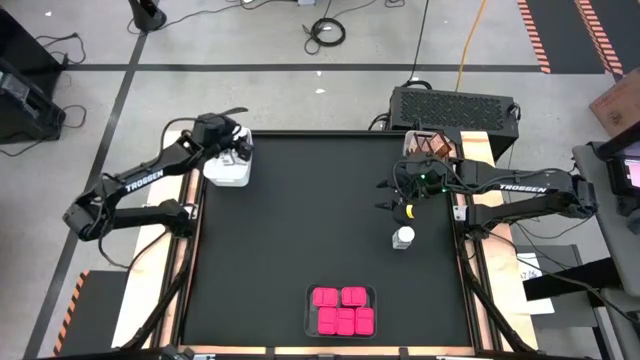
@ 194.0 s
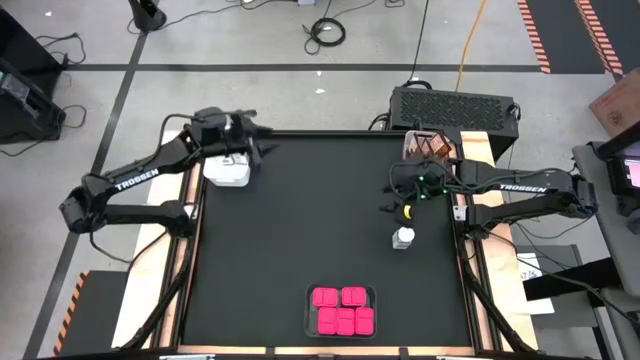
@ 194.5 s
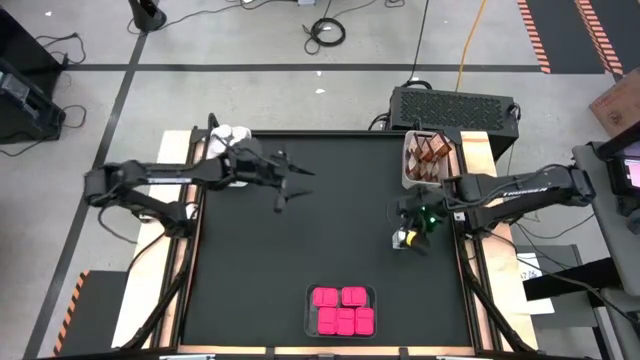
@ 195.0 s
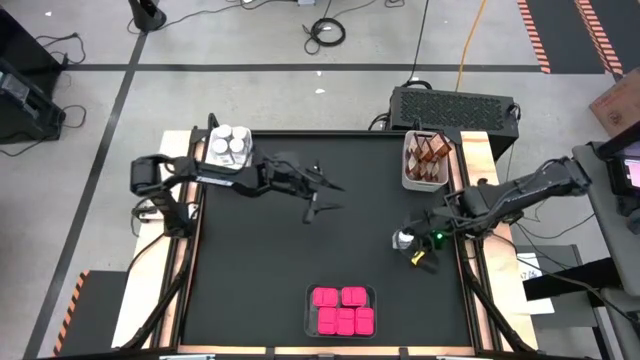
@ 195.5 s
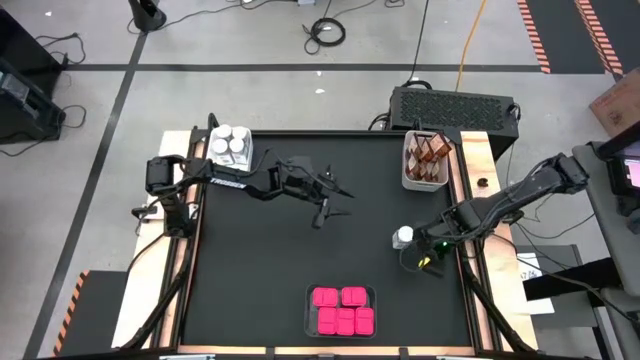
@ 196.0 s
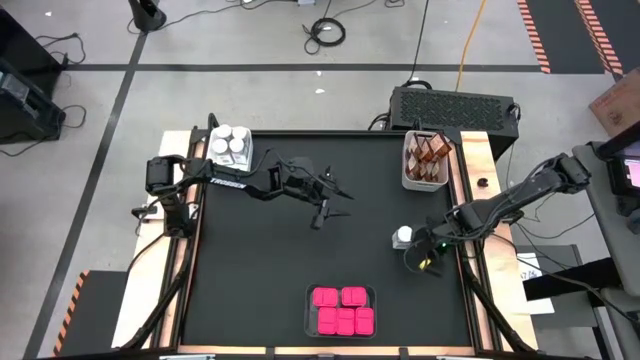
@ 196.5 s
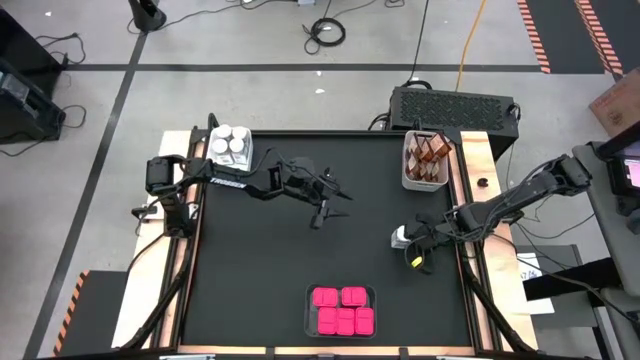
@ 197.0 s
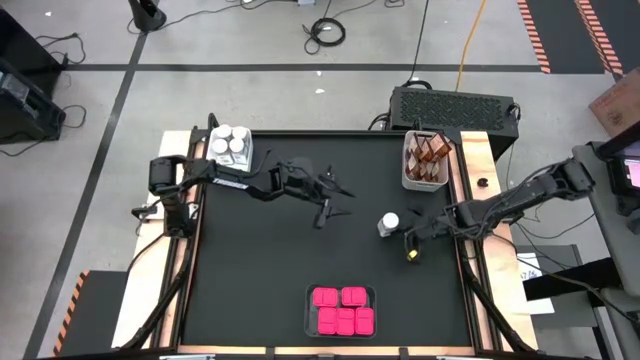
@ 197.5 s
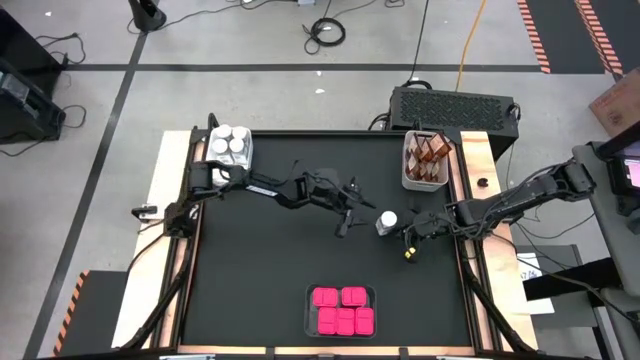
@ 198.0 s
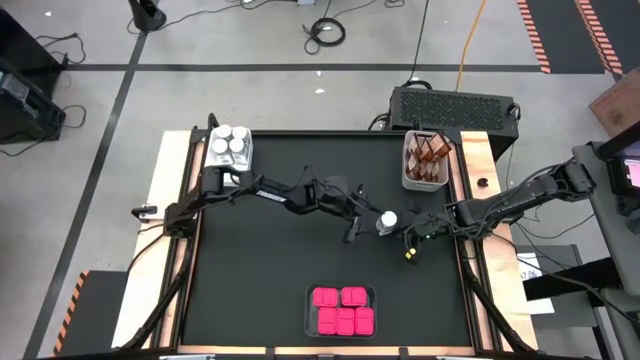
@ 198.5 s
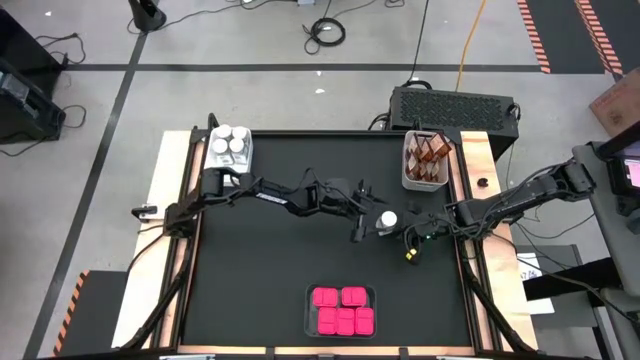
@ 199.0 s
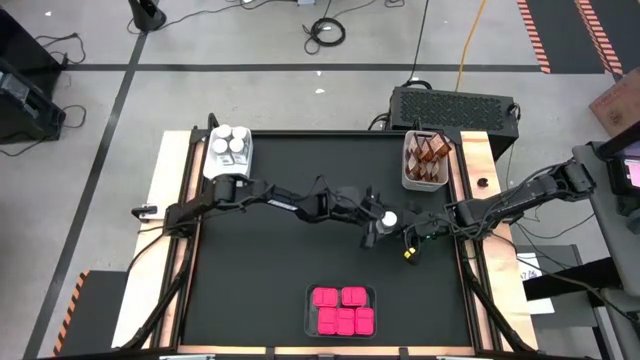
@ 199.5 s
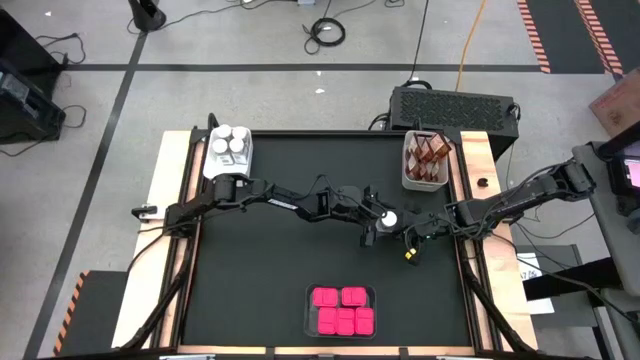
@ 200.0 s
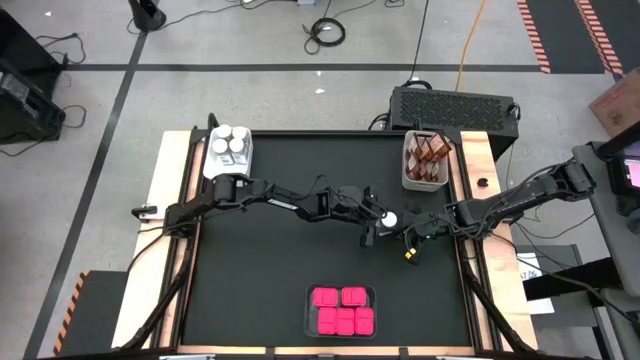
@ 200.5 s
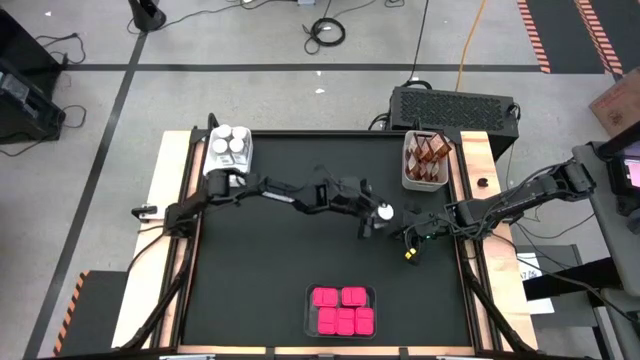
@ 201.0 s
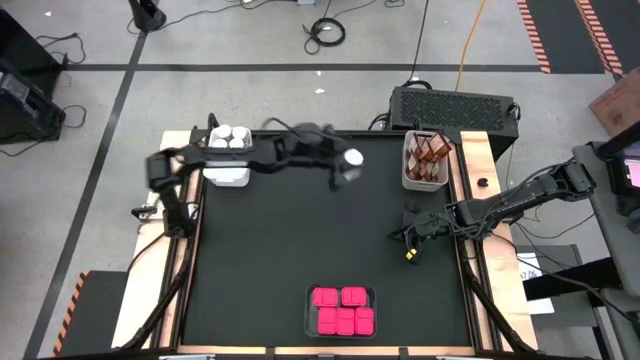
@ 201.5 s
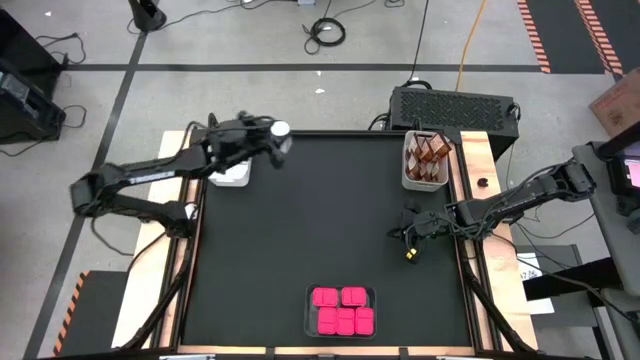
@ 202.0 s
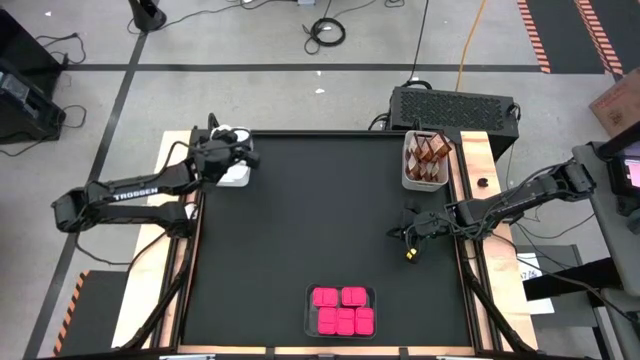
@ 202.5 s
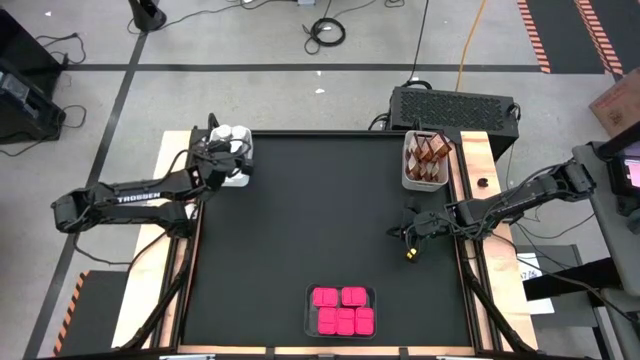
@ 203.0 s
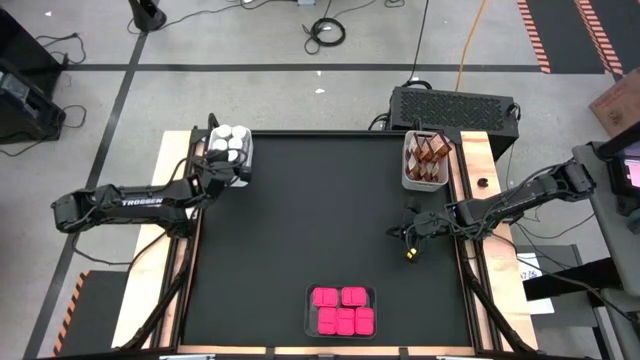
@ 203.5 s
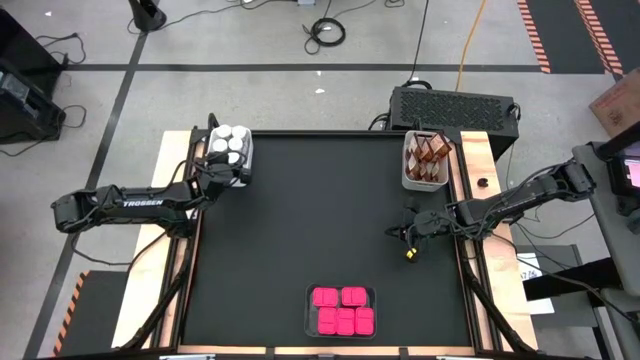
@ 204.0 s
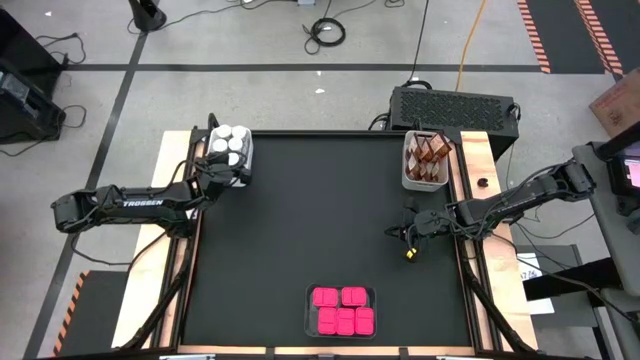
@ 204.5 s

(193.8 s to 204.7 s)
Task: Sort spices by type
Put the white seasoning bottle into the left white bin

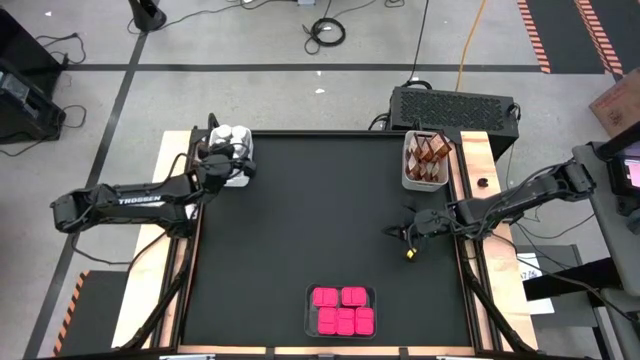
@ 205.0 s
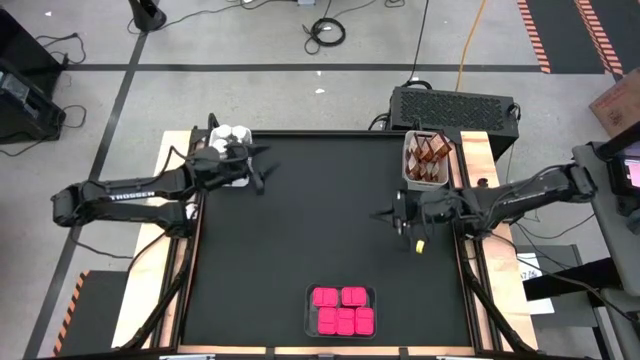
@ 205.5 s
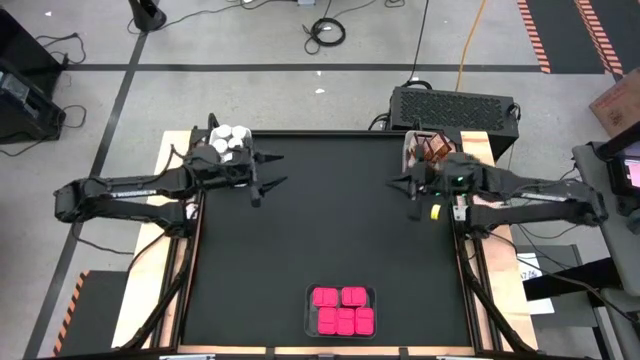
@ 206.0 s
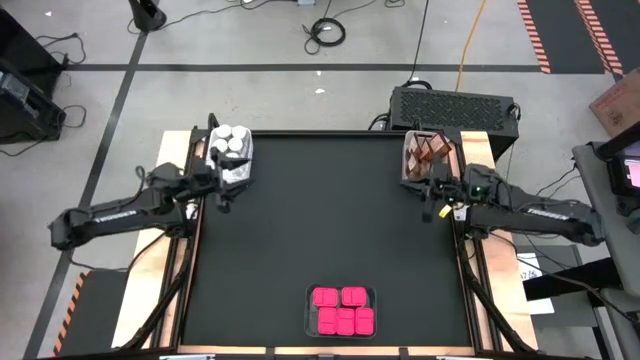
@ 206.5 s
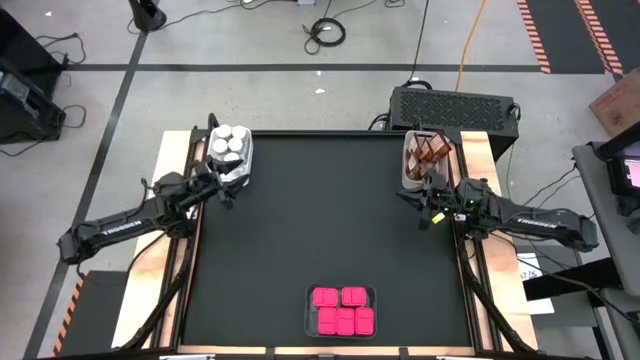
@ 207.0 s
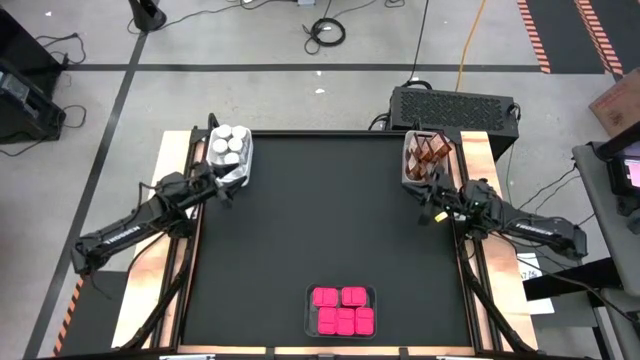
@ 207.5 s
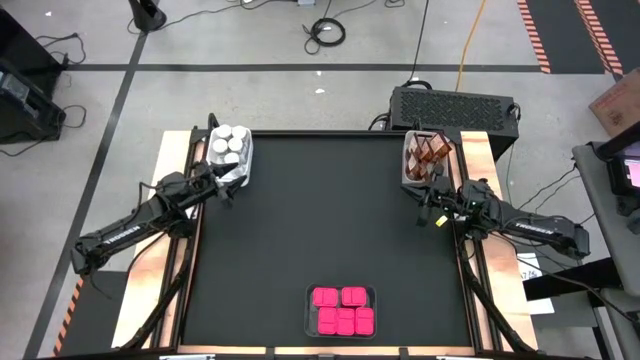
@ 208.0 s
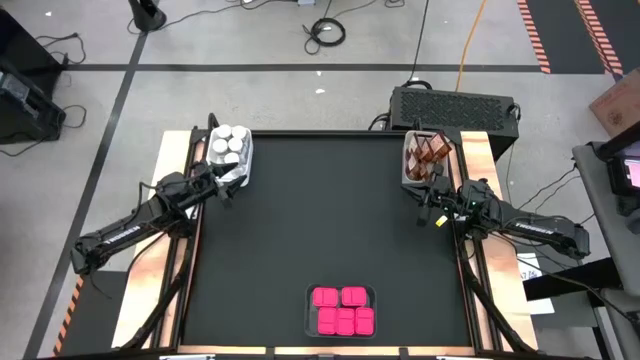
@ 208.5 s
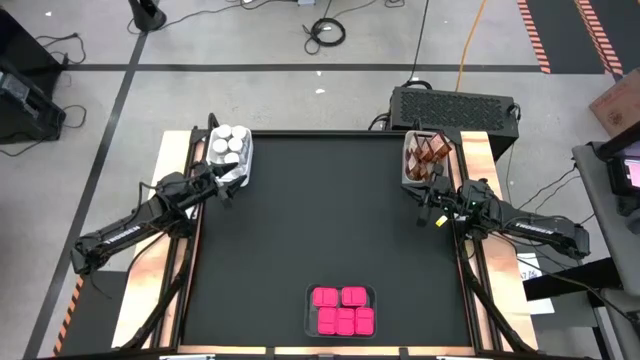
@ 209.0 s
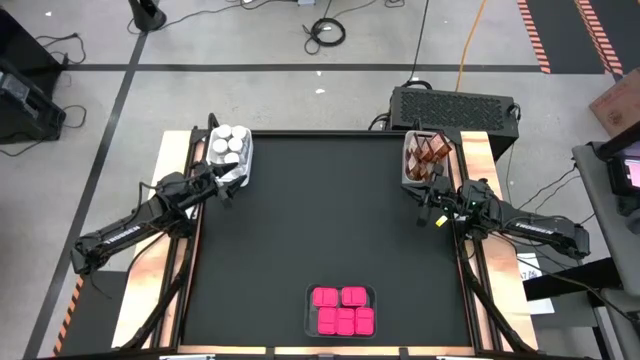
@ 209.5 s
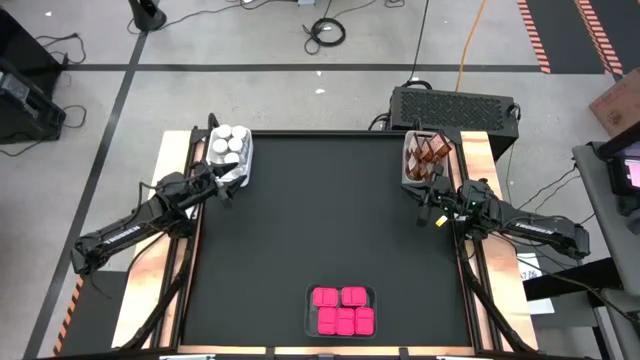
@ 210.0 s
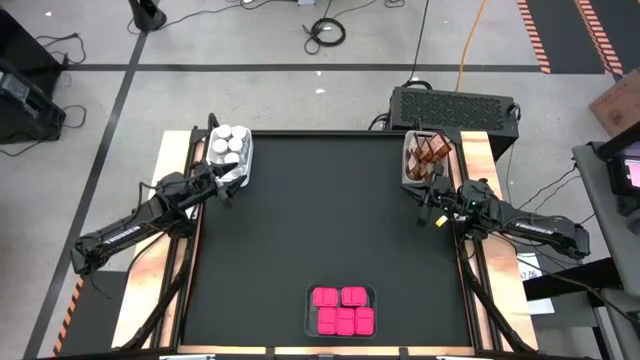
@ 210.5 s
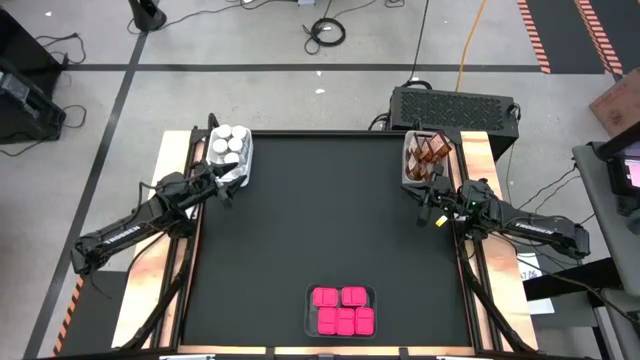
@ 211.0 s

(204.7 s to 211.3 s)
Return to Home Position

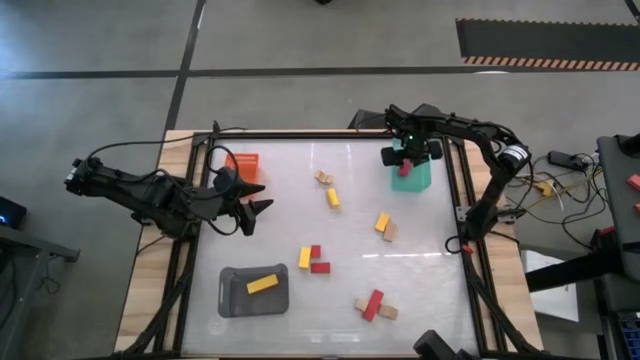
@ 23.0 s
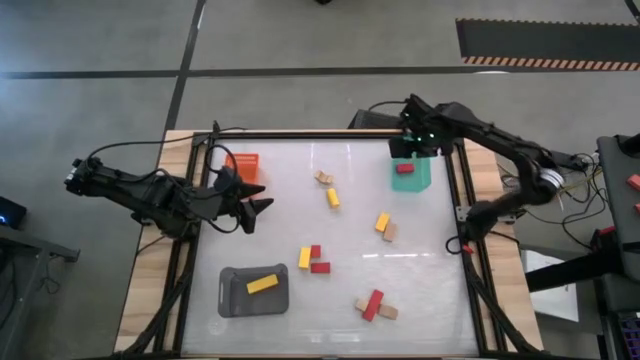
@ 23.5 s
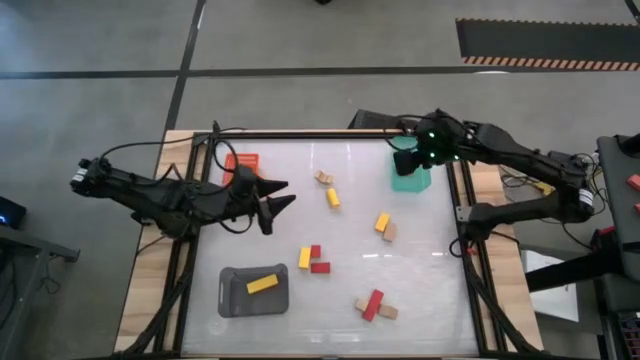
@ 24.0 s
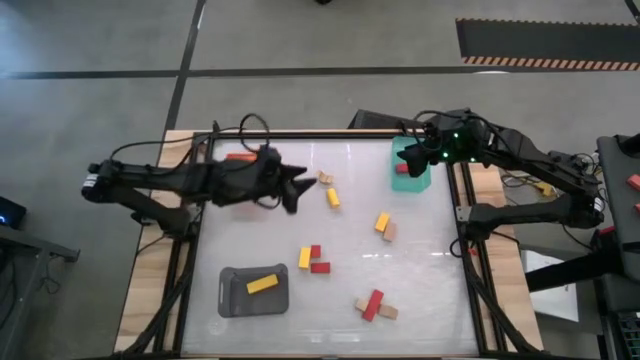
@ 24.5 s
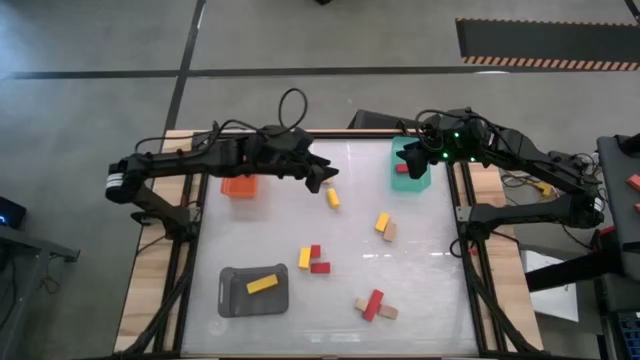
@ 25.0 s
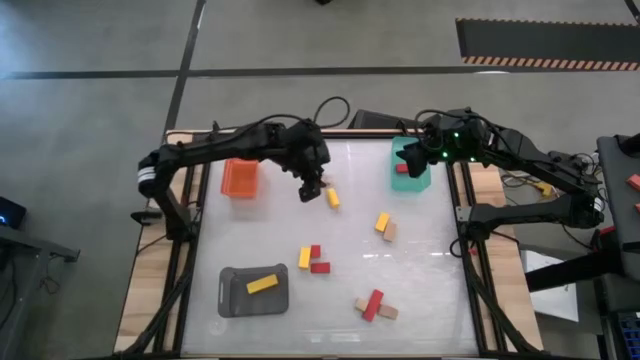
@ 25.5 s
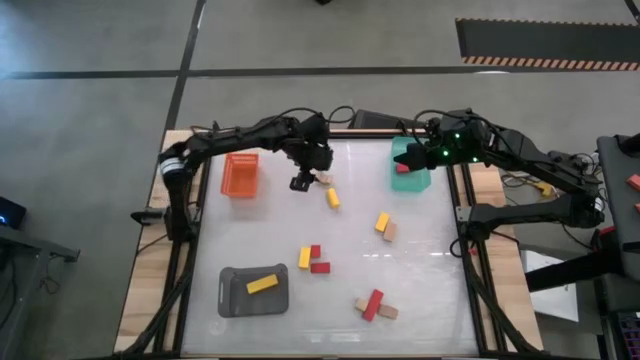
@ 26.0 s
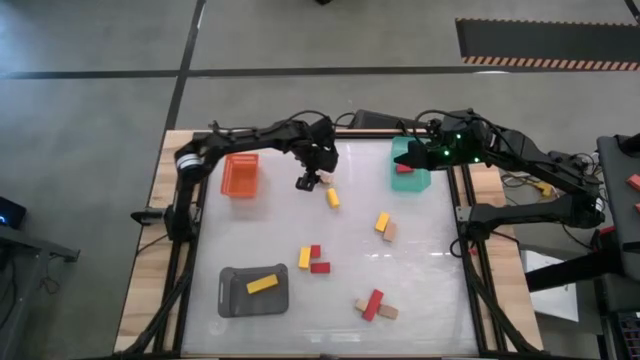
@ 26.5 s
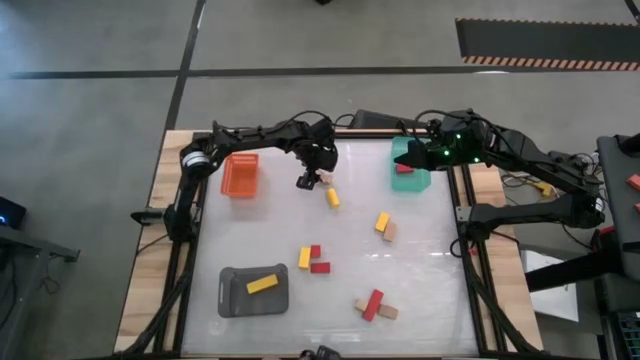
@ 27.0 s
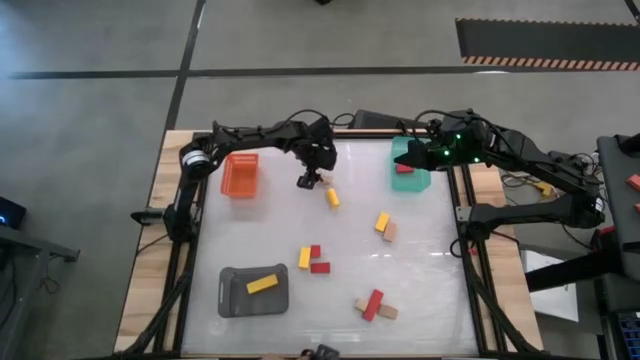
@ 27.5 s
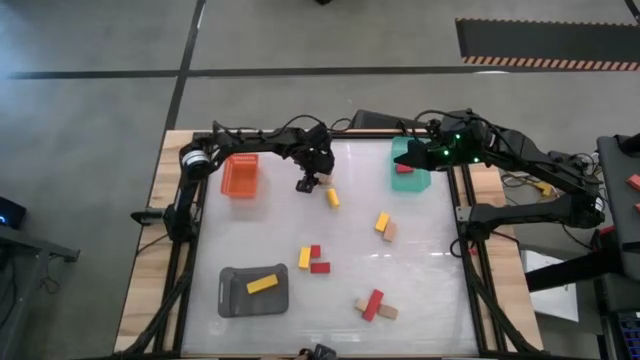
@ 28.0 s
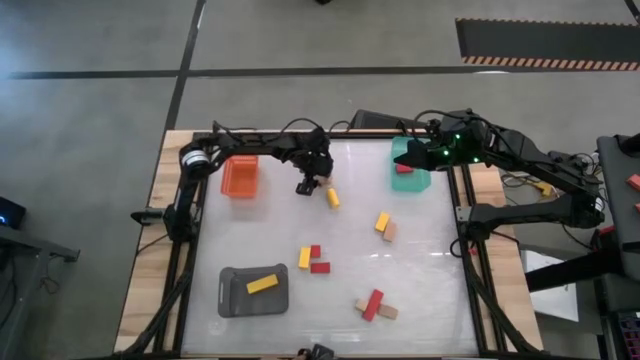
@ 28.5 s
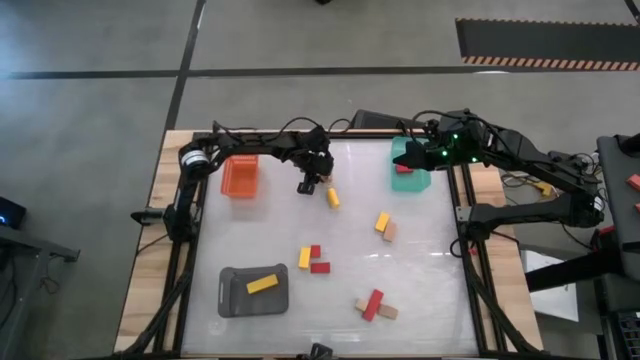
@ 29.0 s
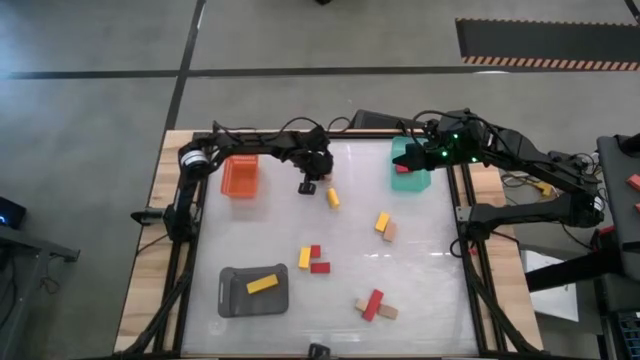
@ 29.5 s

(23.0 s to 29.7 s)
Task: Sort & place blocks by color
Put the brown block into the orange bin
